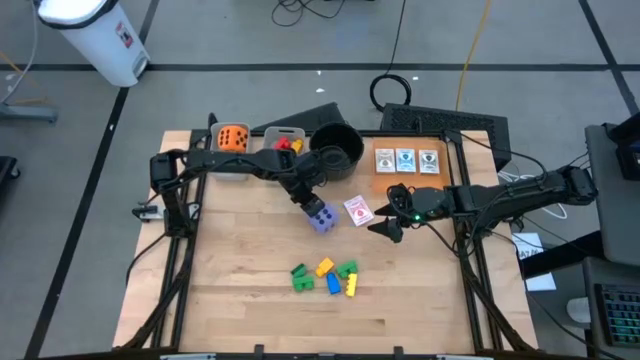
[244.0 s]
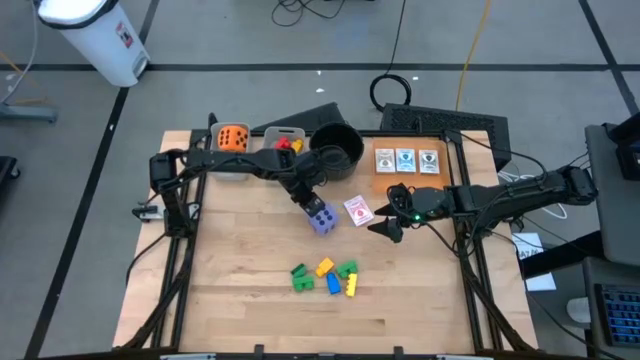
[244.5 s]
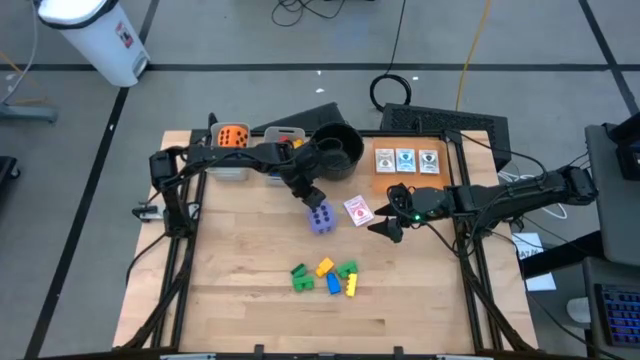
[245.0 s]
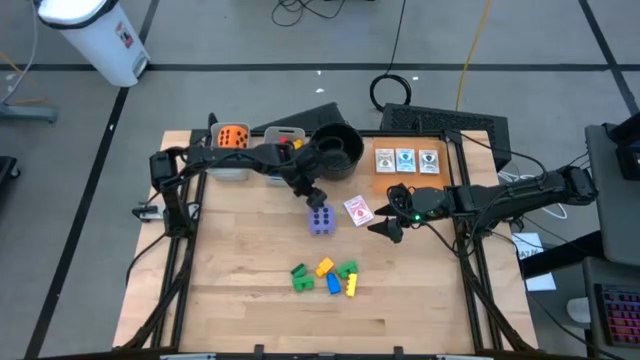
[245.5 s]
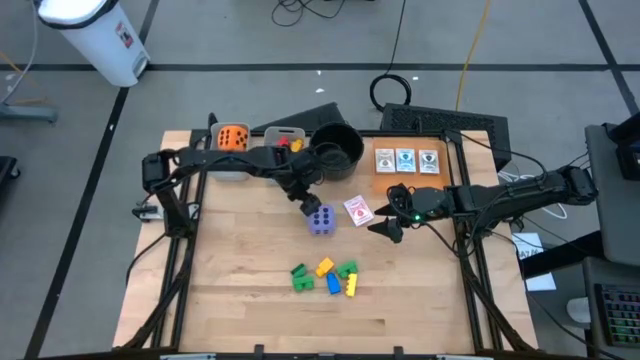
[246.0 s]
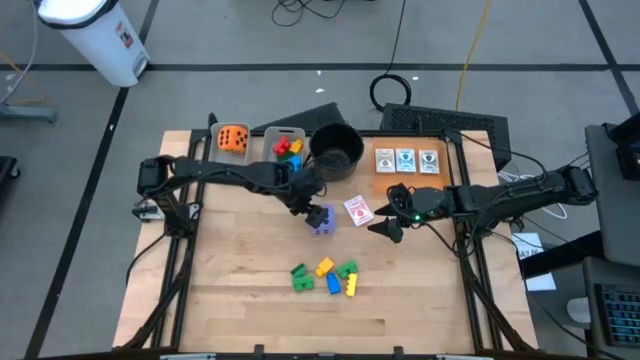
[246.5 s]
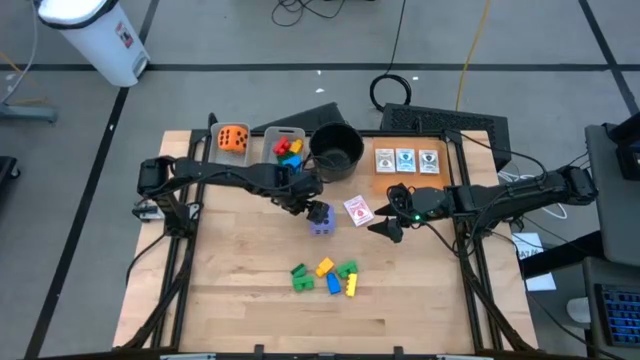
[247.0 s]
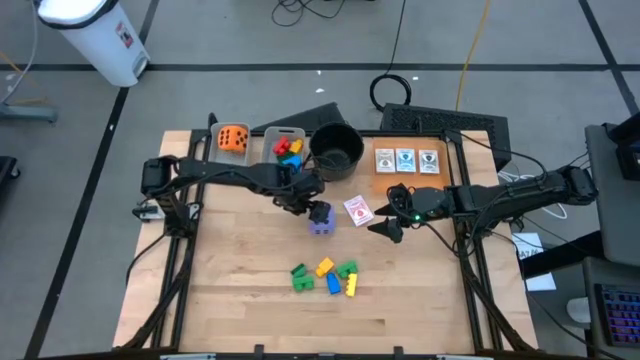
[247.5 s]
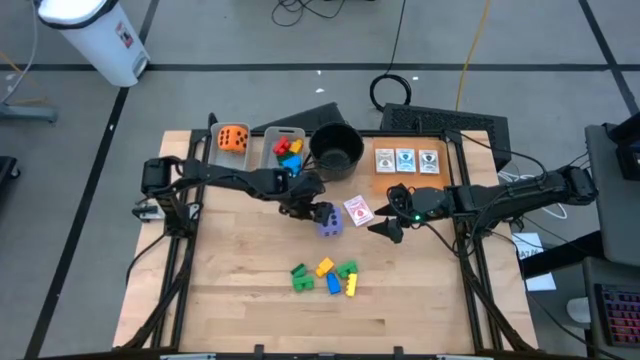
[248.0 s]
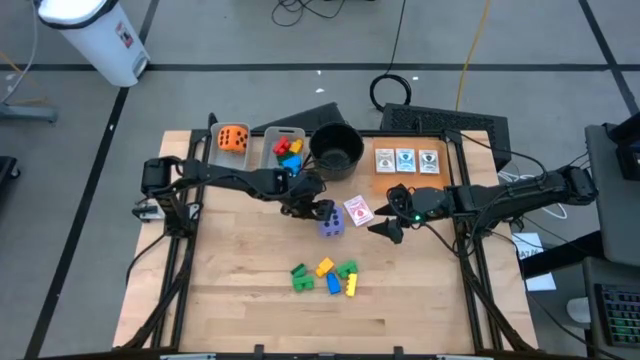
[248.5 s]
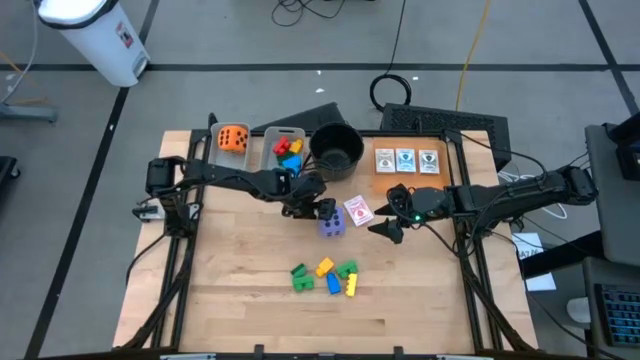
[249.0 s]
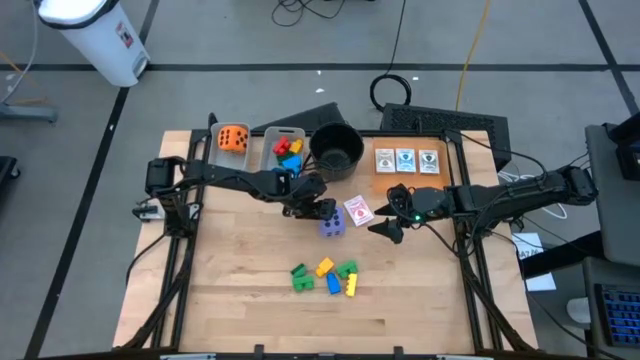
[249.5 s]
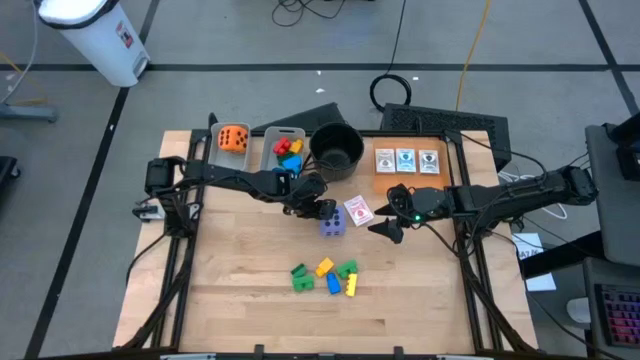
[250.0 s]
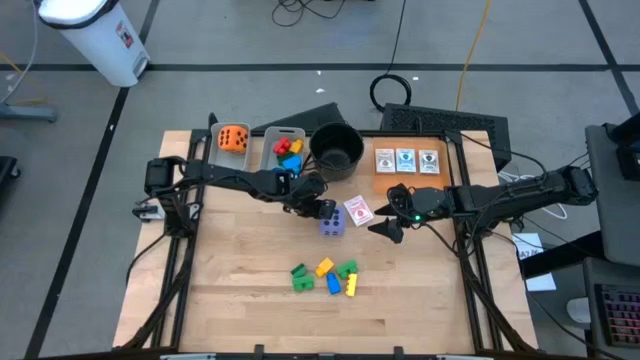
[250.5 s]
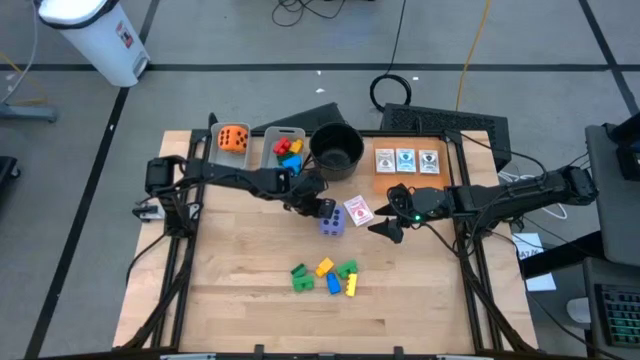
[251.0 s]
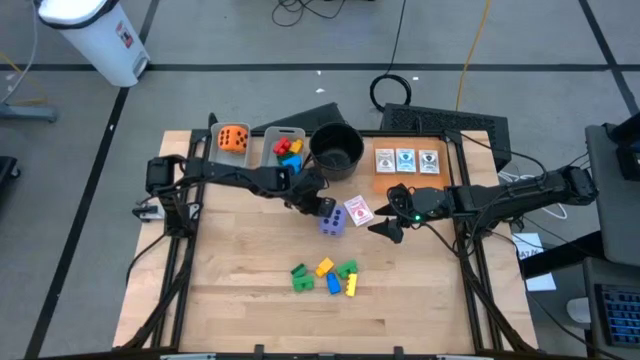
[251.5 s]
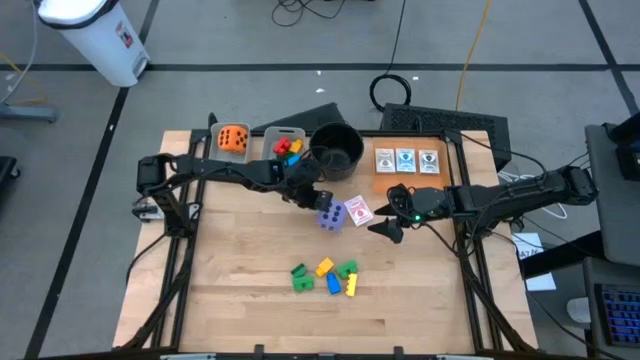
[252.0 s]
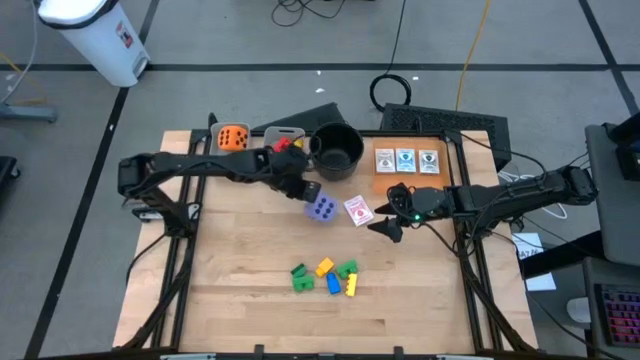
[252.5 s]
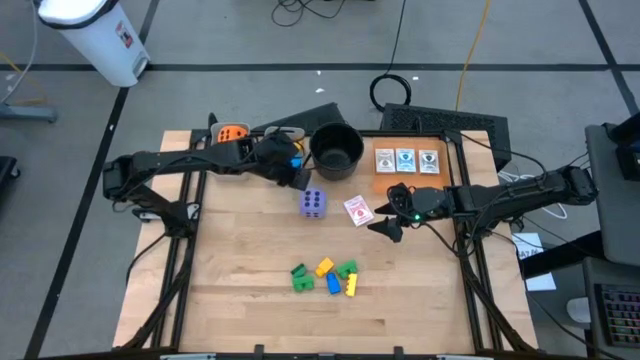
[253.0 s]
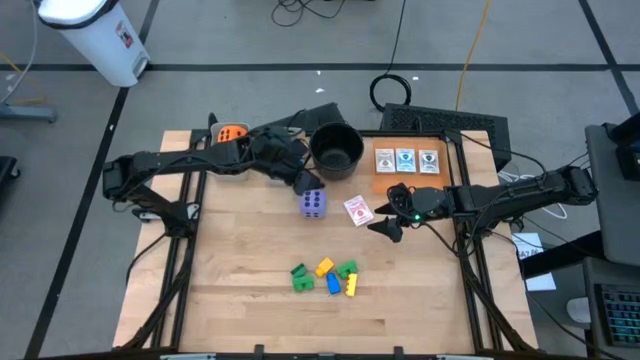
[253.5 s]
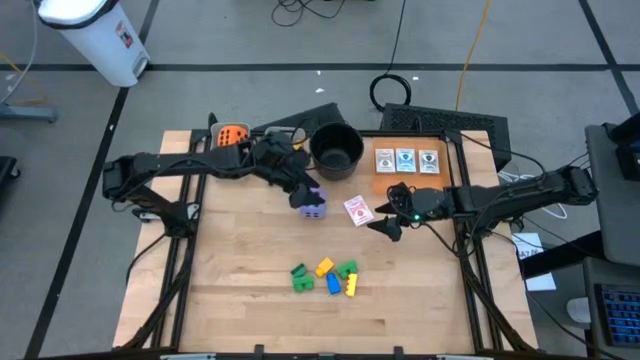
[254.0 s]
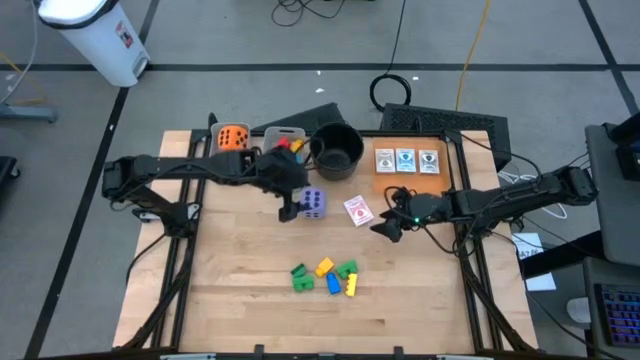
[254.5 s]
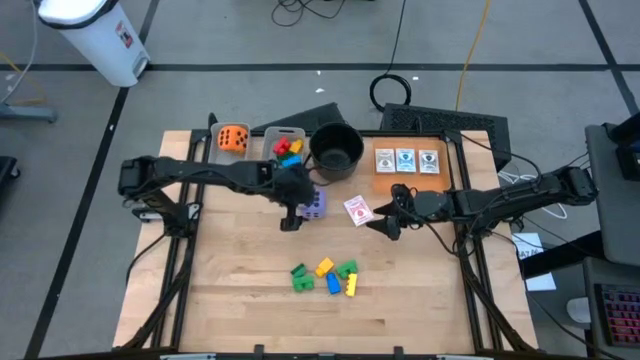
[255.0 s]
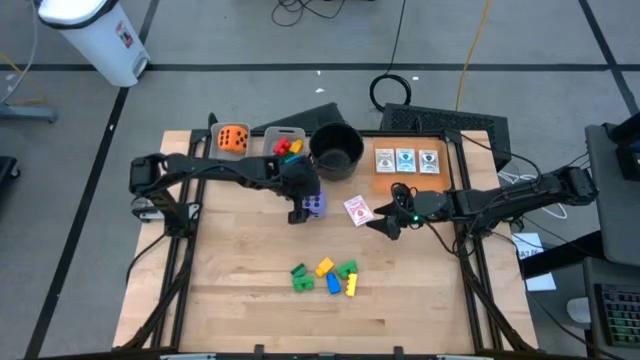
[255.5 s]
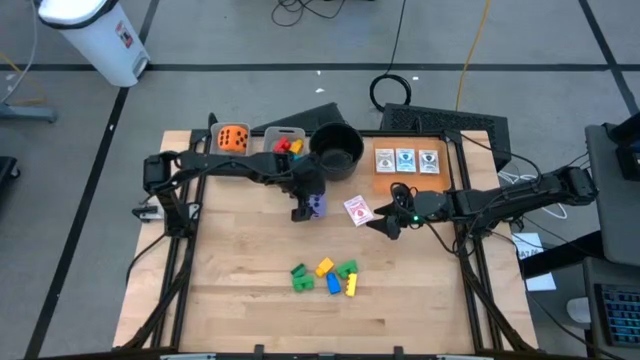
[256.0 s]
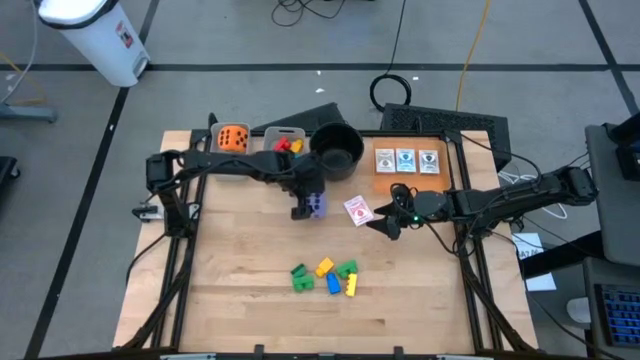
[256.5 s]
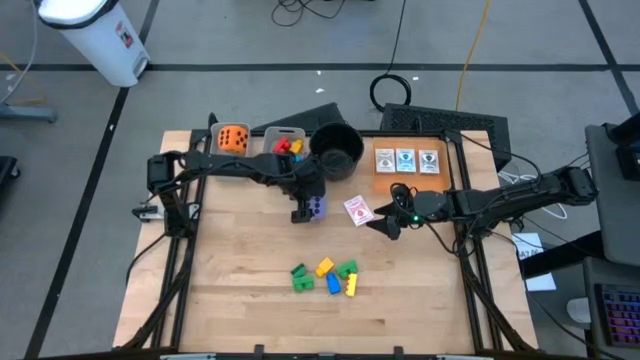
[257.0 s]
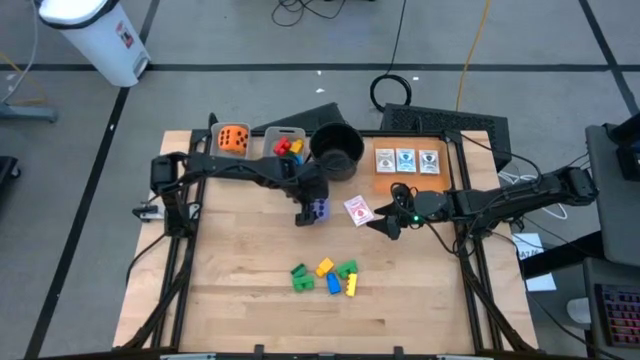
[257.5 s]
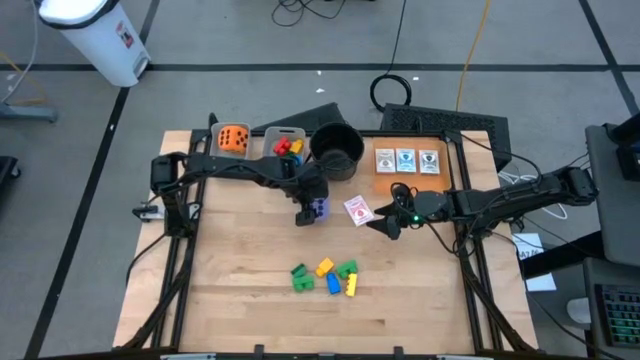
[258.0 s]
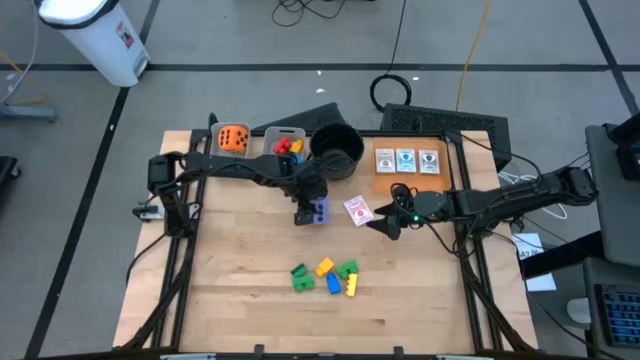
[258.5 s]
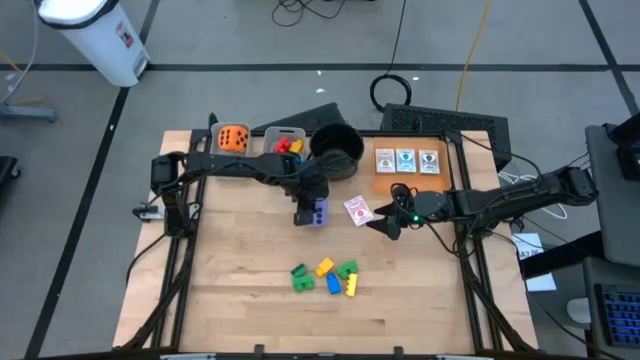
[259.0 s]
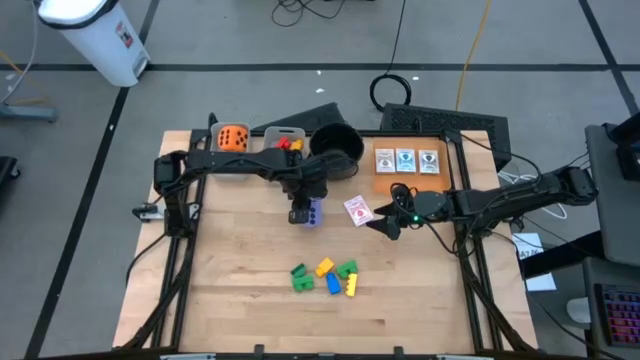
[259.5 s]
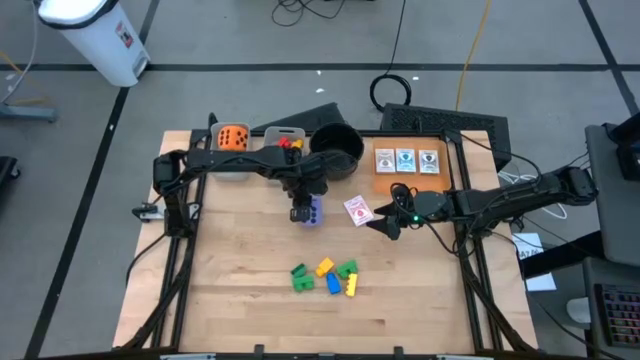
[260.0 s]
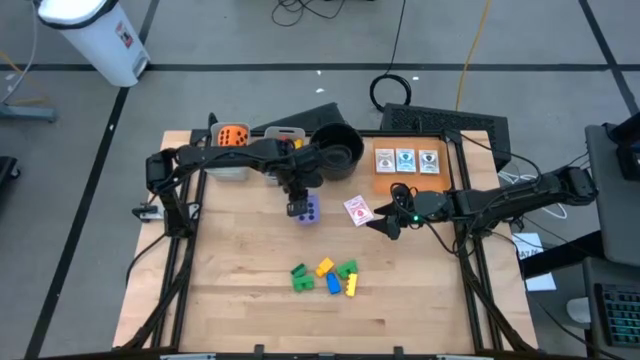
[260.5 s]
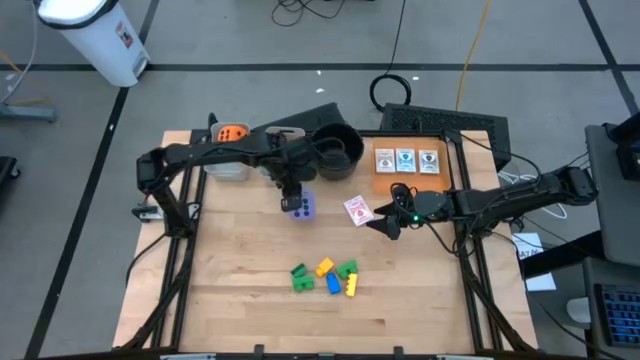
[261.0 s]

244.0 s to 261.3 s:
Task: Pick & Place Toys
Put the purple die into the left gray bin

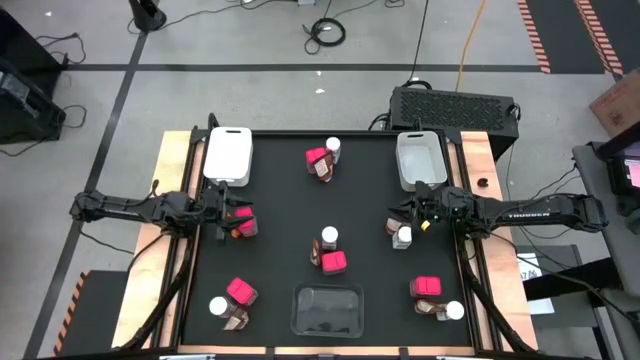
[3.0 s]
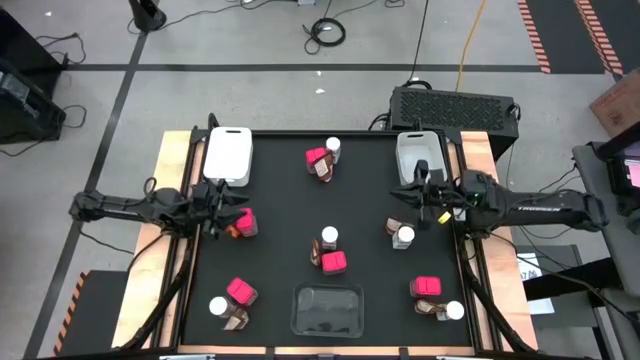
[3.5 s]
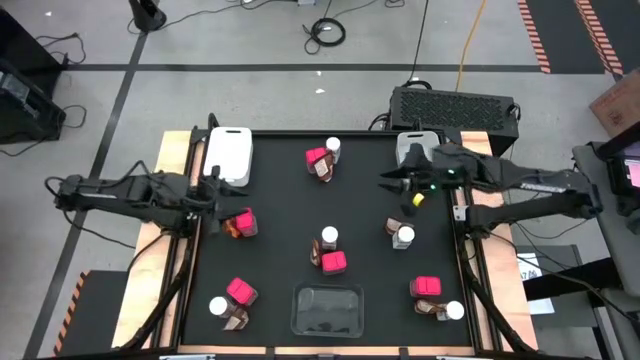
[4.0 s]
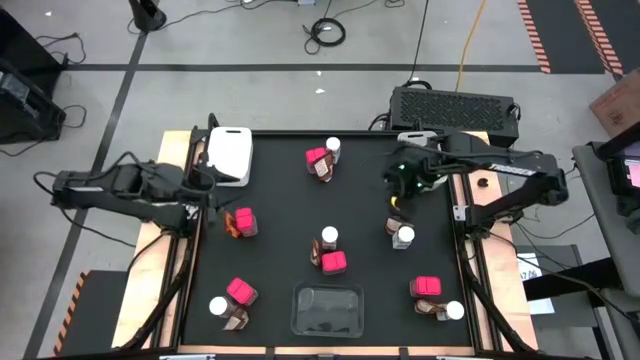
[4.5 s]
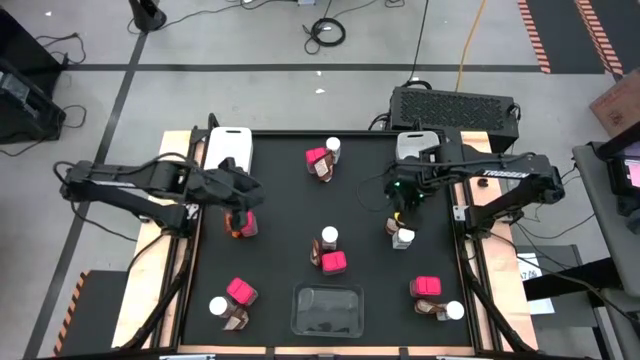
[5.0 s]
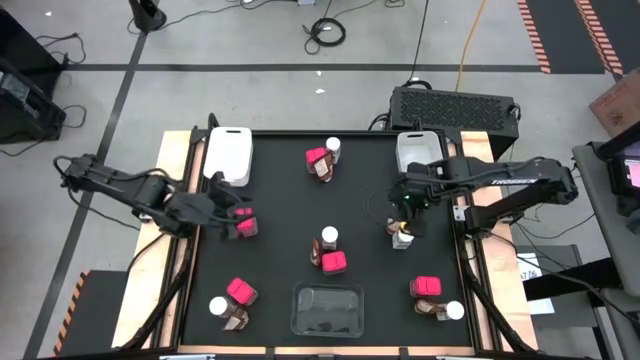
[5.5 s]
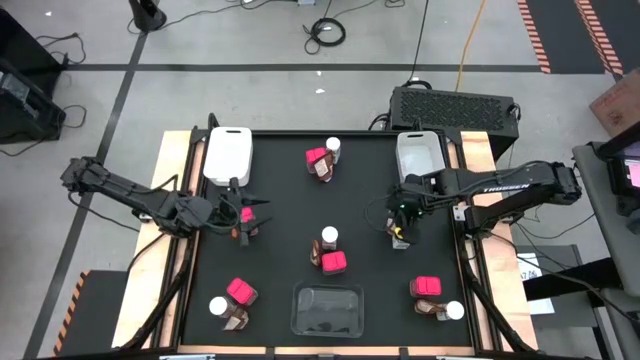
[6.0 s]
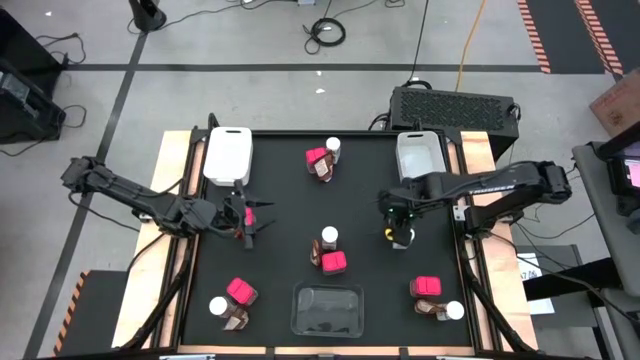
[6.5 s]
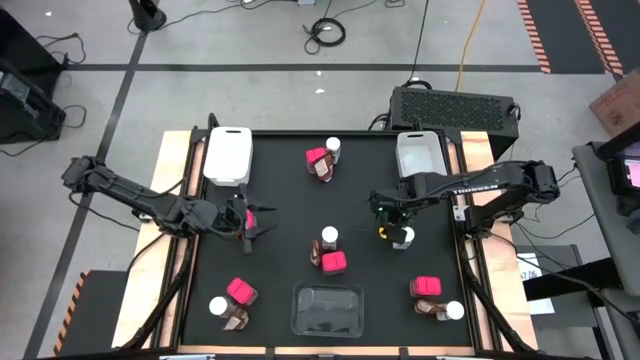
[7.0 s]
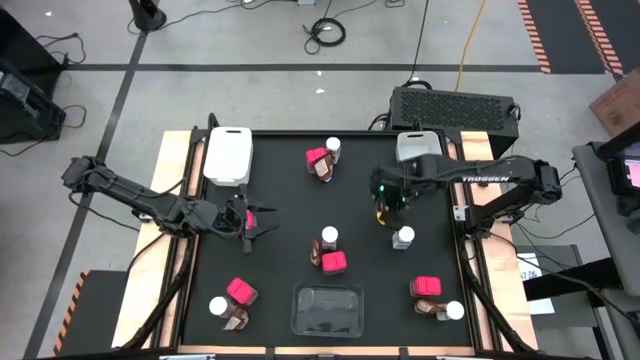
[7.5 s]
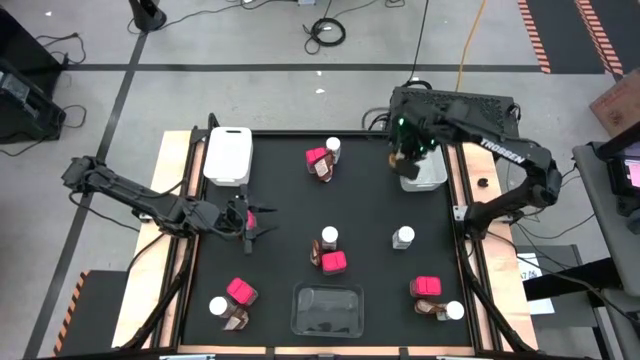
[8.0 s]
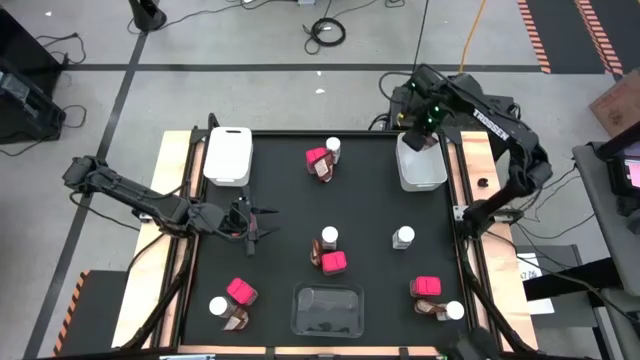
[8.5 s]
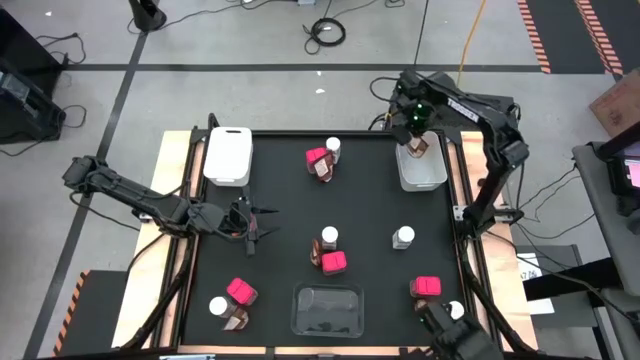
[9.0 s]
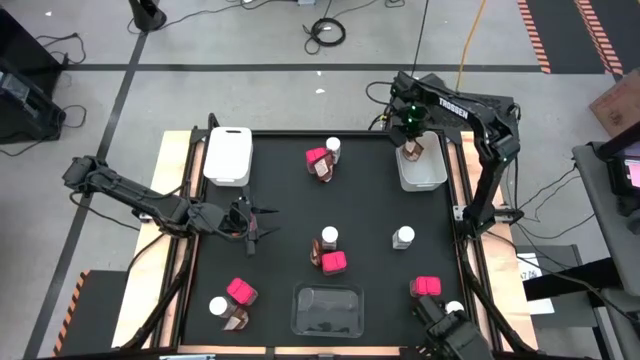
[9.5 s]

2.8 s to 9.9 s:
Task: Sort spices by type
Put the brown seasoning pack into the right white bin
